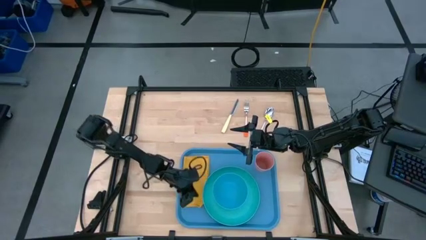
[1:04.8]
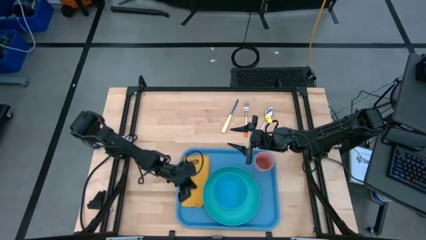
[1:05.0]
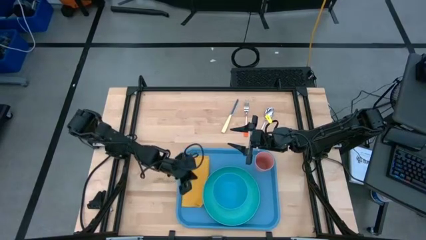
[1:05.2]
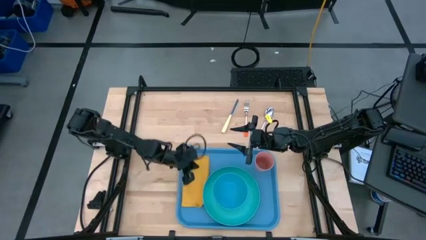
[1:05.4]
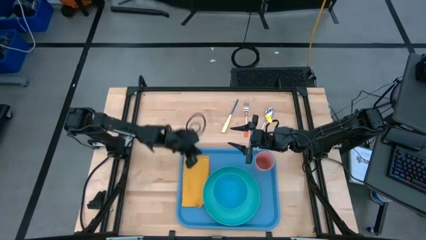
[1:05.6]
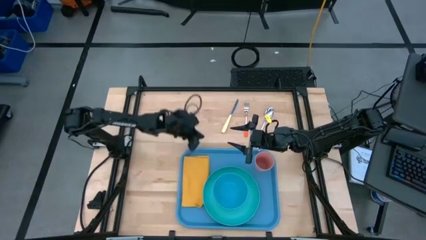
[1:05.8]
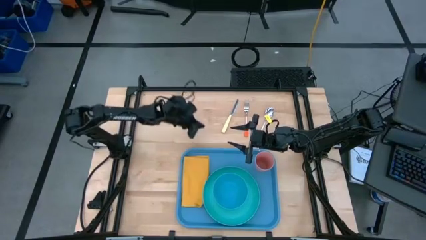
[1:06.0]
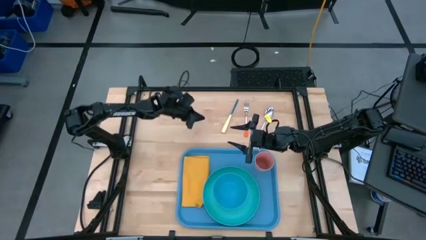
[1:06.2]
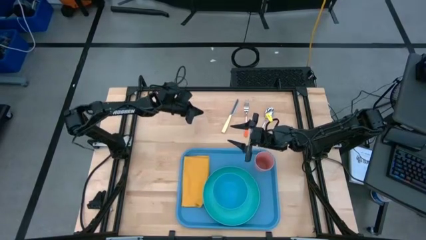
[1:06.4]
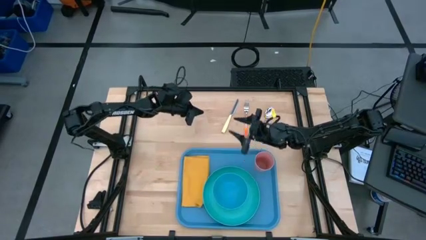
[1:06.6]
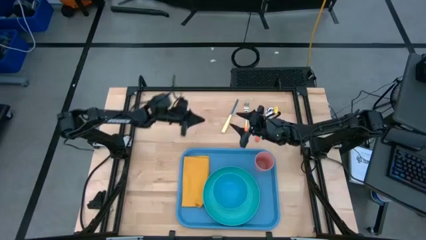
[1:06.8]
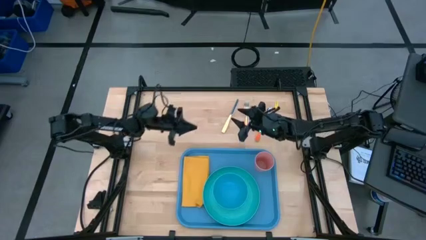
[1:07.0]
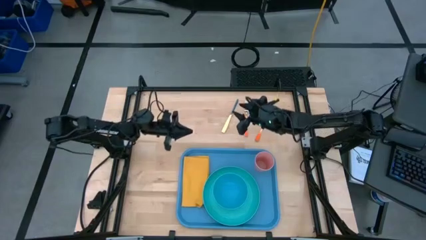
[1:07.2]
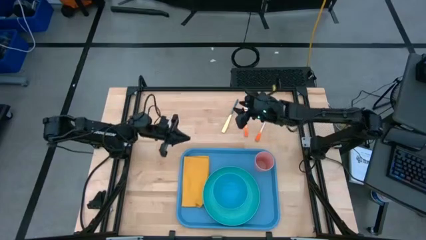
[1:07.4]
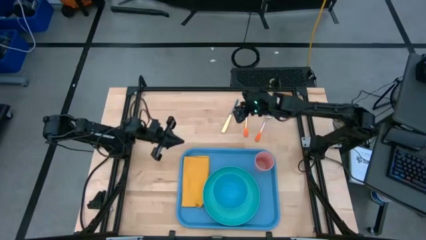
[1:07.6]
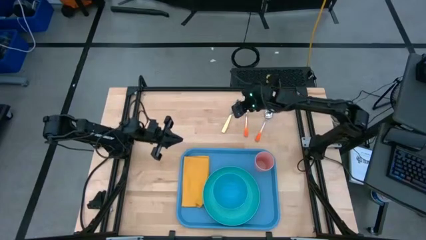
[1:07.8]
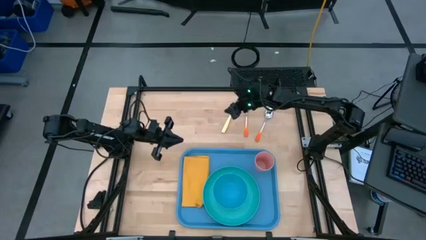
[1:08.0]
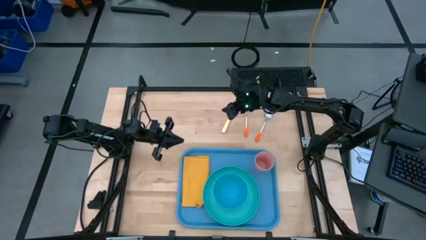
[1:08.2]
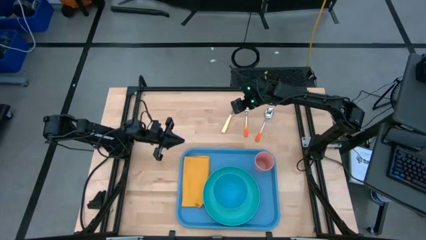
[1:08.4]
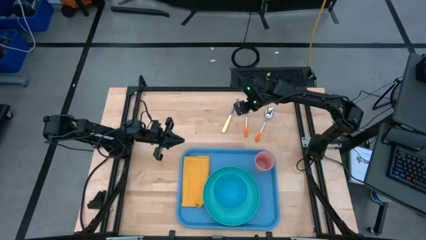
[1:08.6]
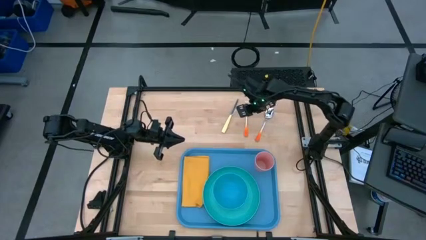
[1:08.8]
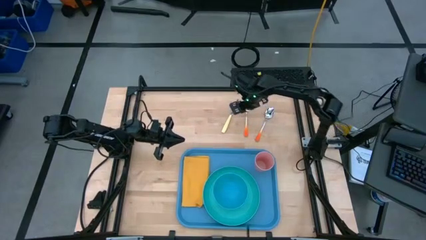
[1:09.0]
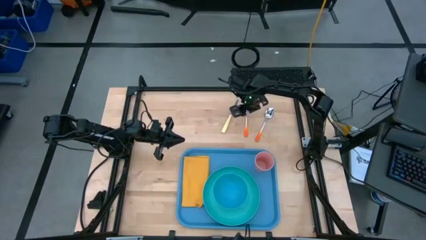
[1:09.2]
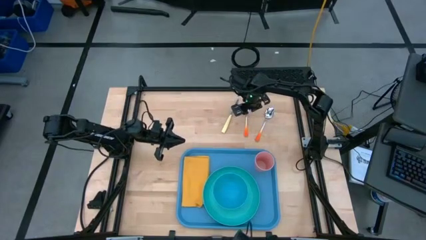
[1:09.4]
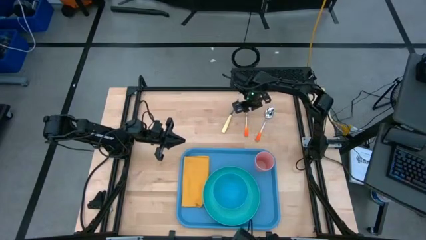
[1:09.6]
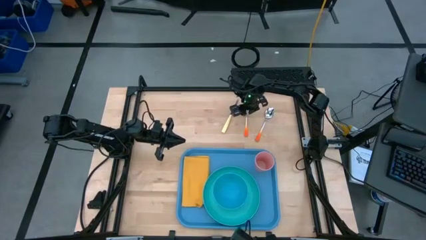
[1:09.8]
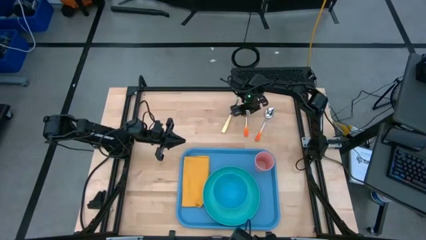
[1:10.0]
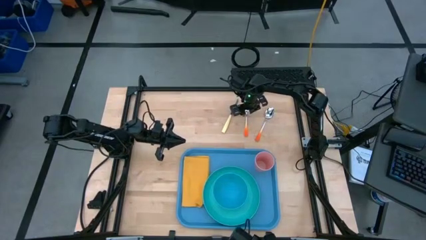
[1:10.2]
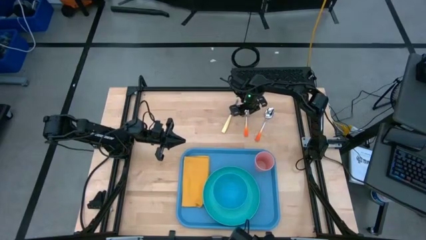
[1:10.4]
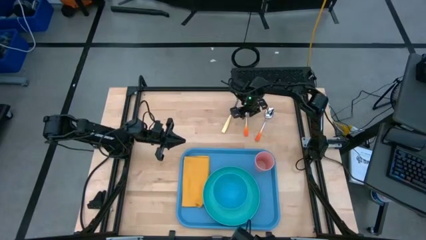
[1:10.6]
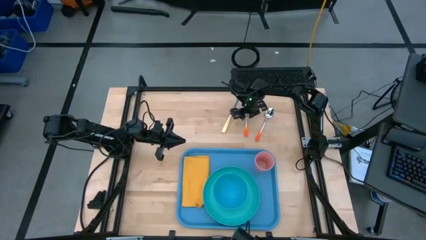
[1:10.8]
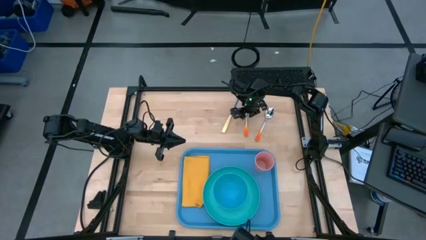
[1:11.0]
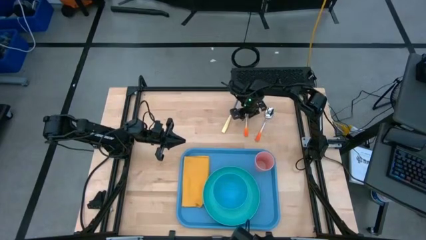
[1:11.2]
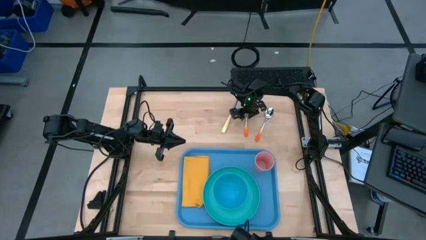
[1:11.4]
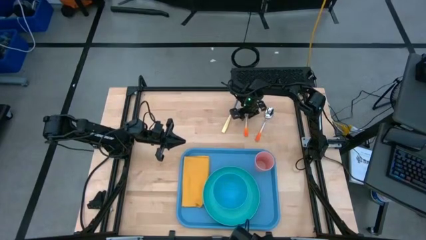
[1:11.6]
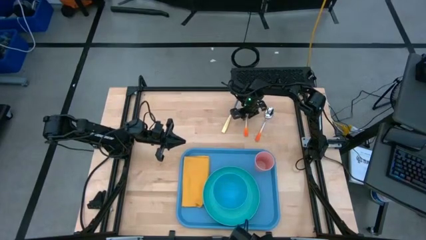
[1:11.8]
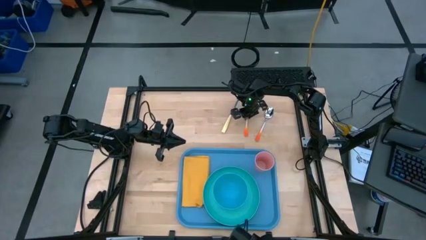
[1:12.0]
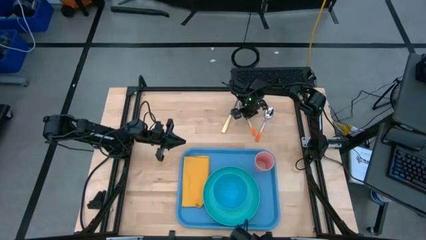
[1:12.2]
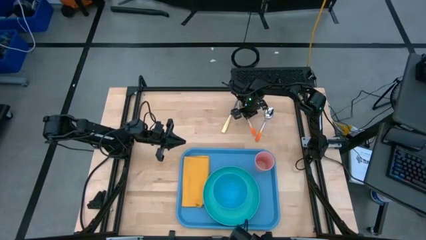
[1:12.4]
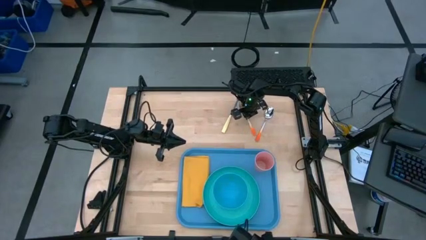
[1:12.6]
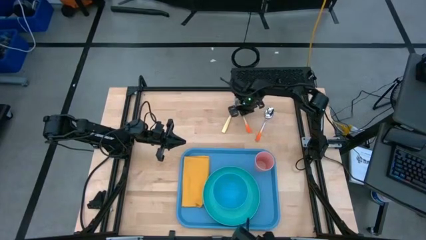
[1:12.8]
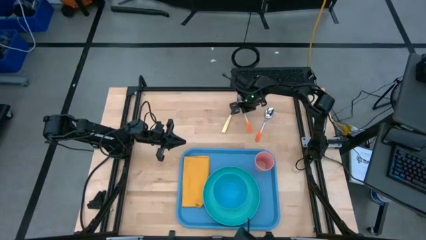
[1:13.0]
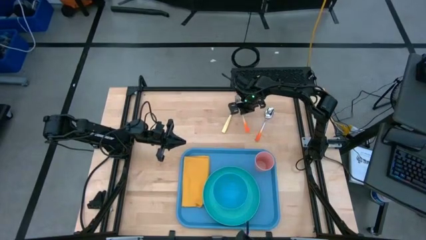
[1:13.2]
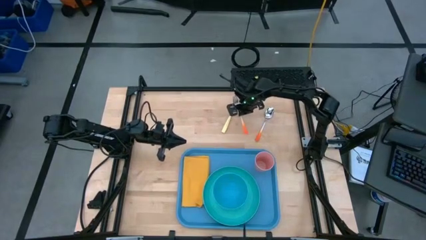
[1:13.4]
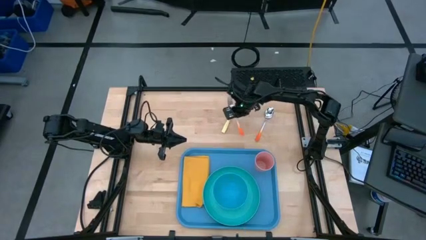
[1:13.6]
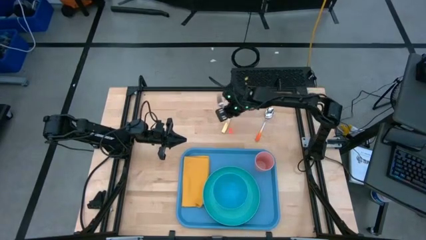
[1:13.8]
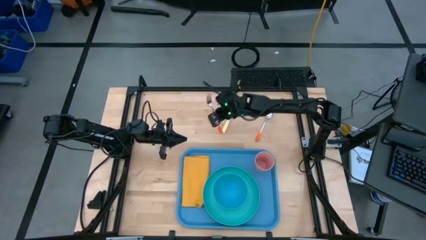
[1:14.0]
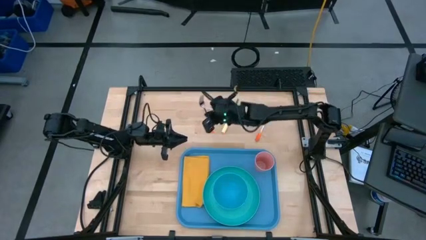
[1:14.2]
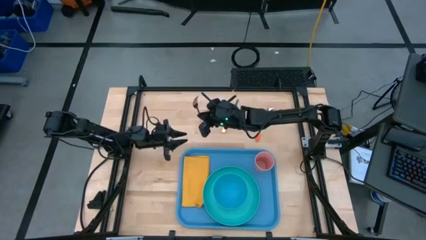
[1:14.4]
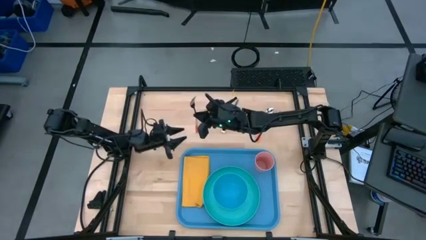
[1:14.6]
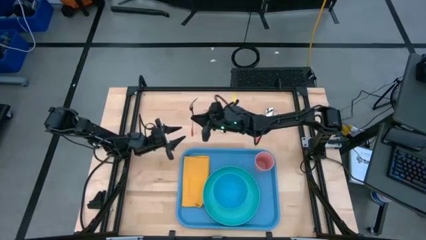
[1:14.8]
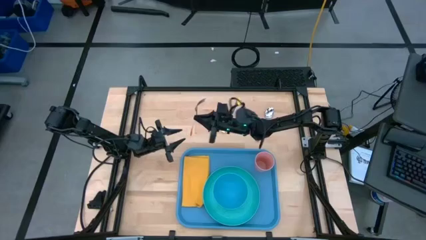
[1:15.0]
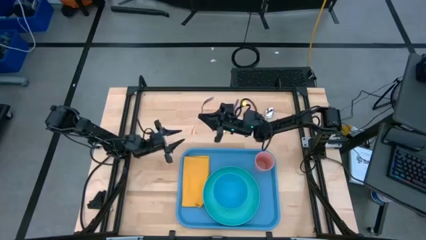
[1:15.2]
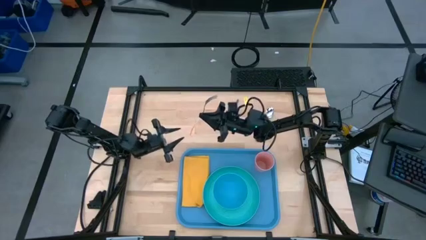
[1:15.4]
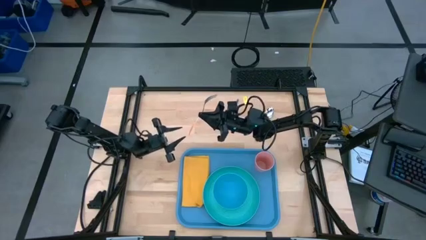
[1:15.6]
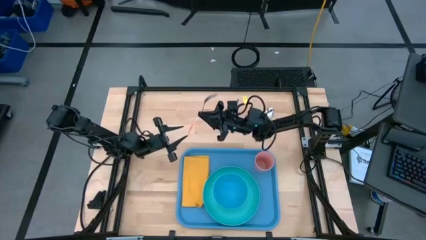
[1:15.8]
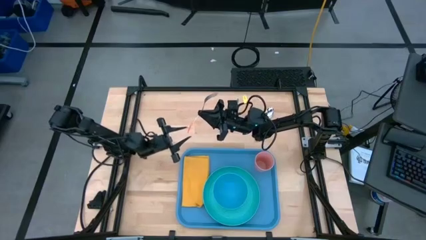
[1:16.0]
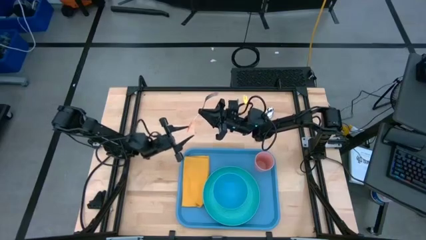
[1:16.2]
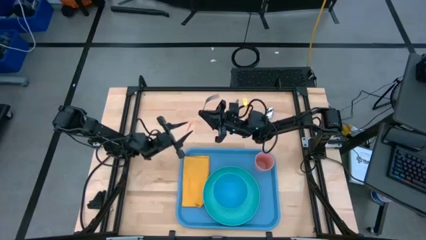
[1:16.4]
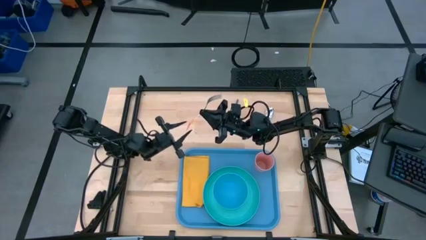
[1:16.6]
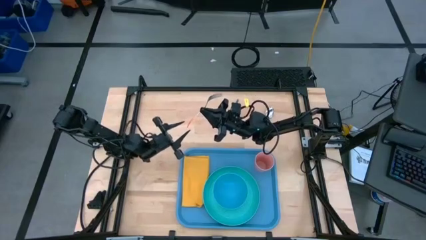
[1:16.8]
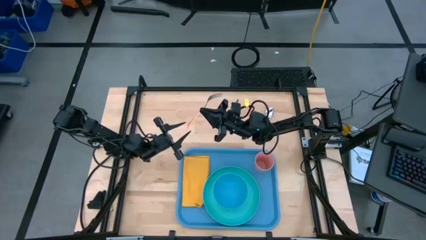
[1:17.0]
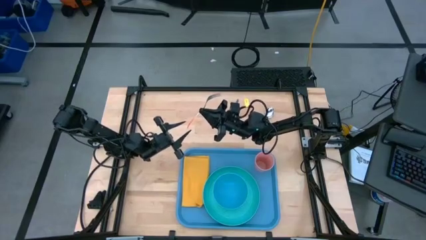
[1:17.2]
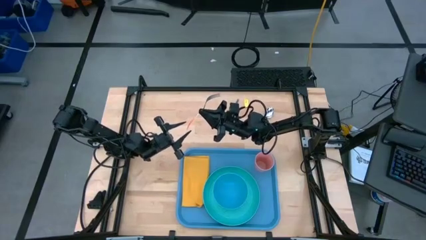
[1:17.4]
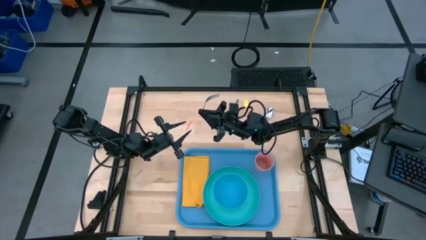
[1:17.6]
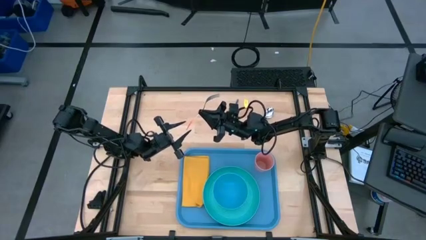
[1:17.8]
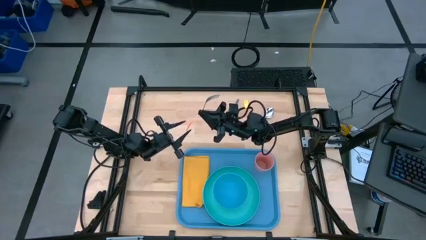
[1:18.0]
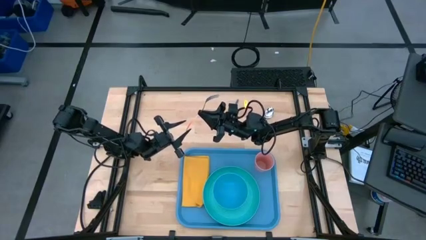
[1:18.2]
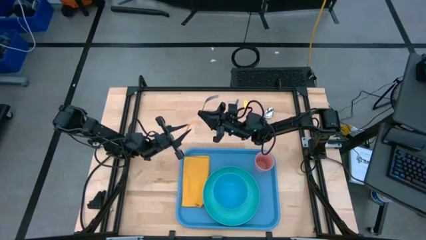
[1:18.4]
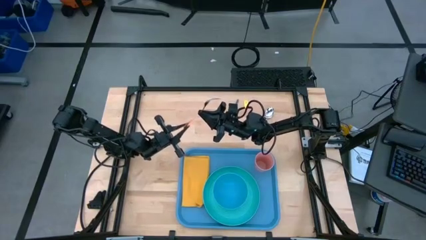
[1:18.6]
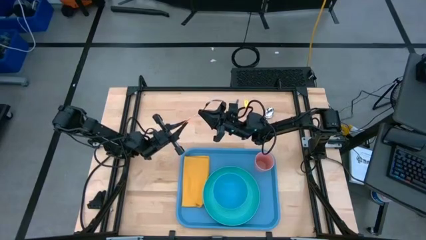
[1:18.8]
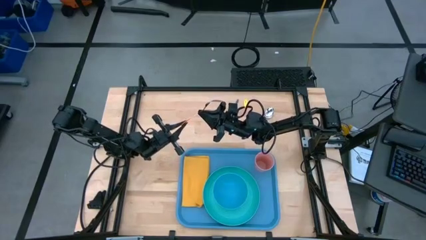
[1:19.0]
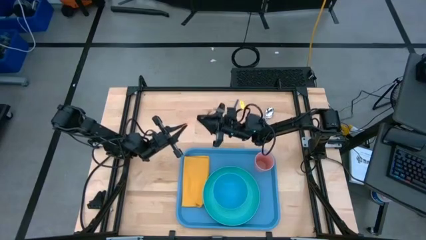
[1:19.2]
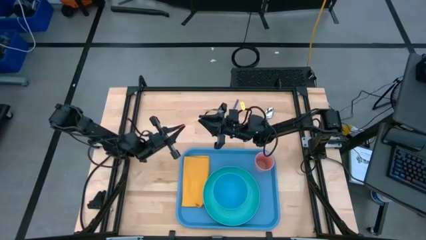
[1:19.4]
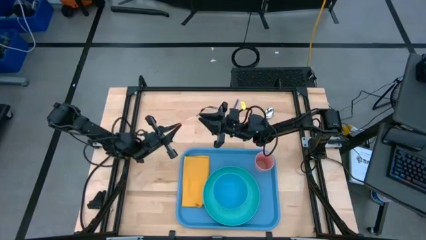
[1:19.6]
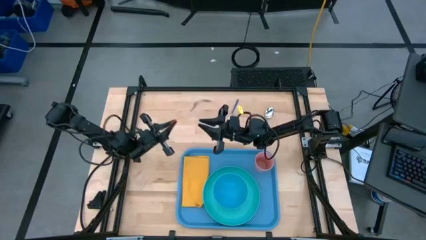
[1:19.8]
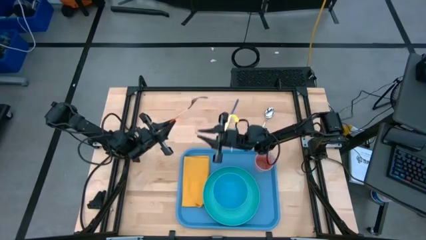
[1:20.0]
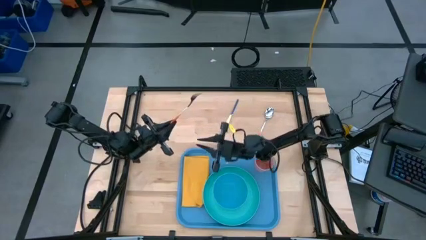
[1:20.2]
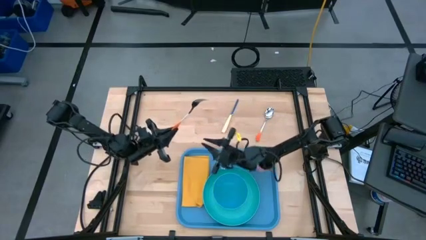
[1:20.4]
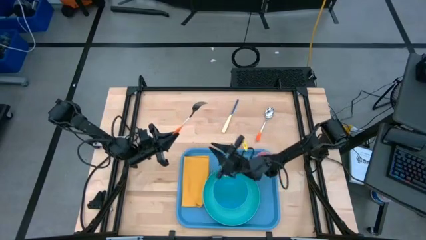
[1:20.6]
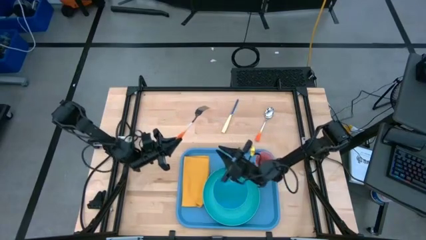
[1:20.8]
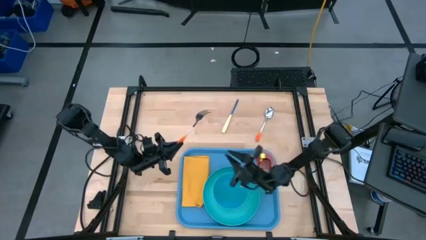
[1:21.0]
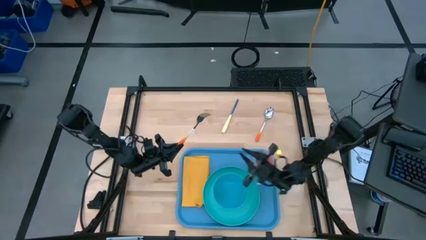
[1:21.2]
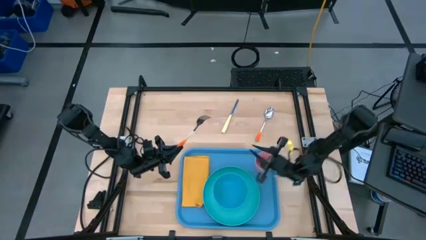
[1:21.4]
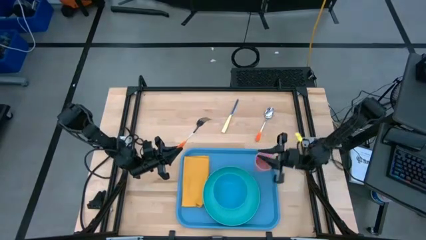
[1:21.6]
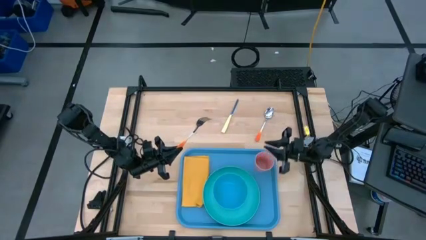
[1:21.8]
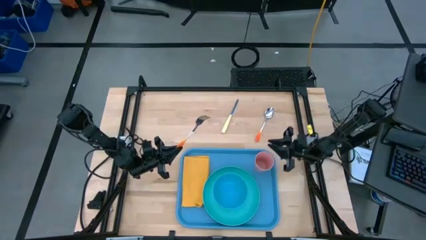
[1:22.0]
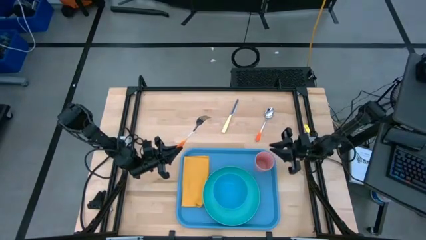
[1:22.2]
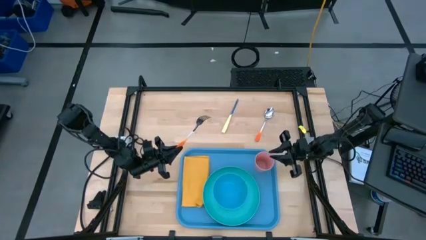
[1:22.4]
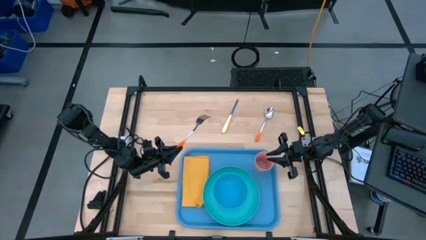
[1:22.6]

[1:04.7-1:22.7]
Task: Set up tray
Put the orange fork on top of the orange napkin on the blue serving tray
